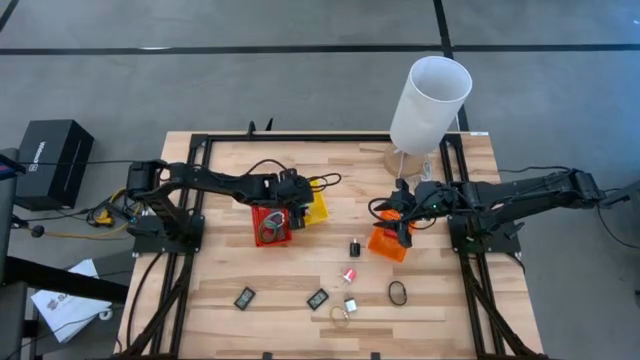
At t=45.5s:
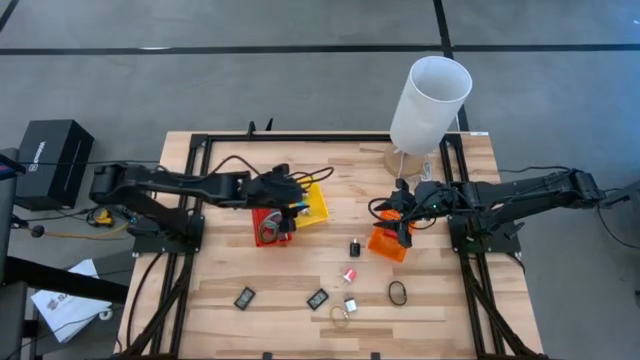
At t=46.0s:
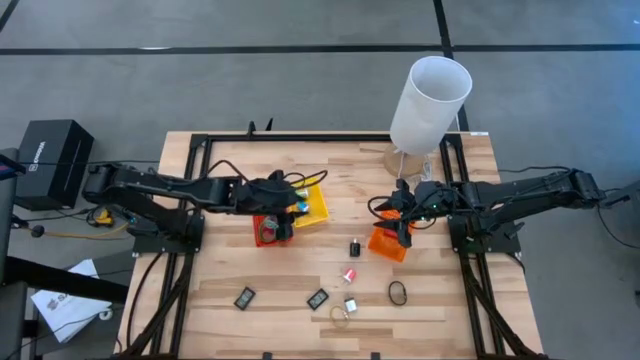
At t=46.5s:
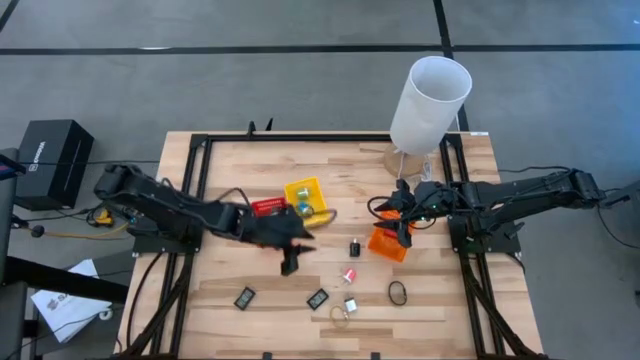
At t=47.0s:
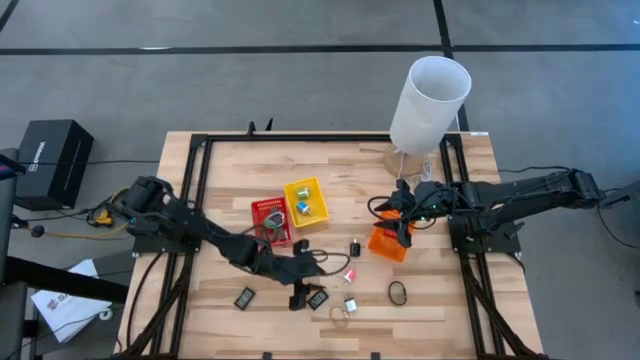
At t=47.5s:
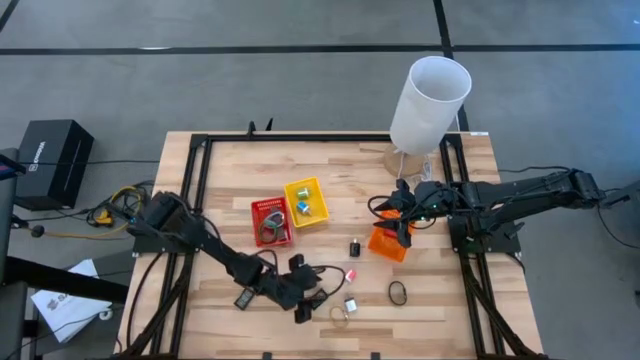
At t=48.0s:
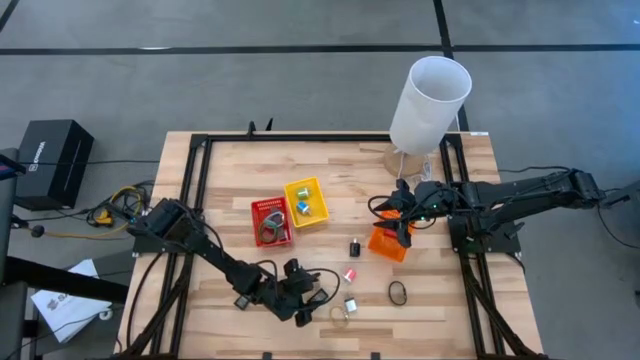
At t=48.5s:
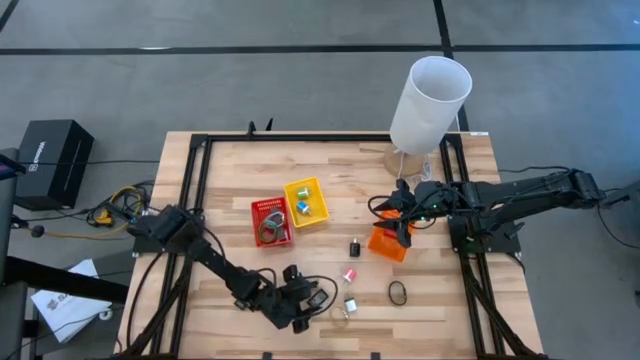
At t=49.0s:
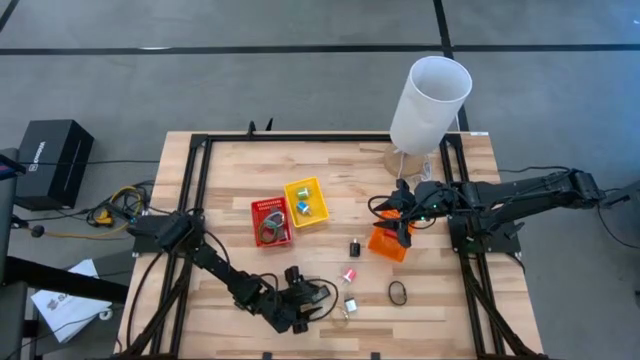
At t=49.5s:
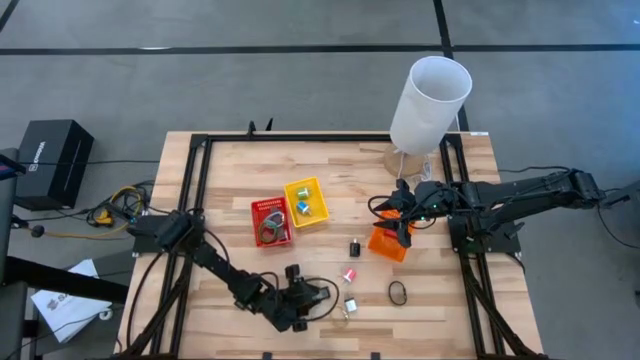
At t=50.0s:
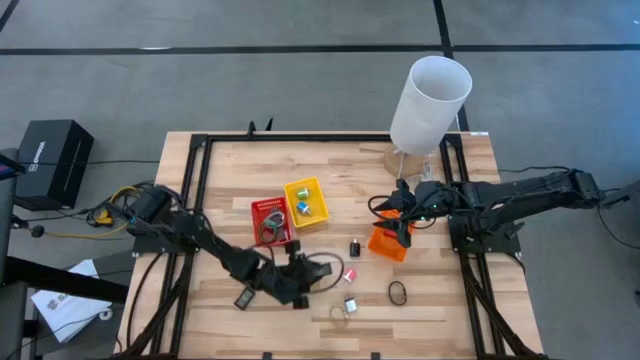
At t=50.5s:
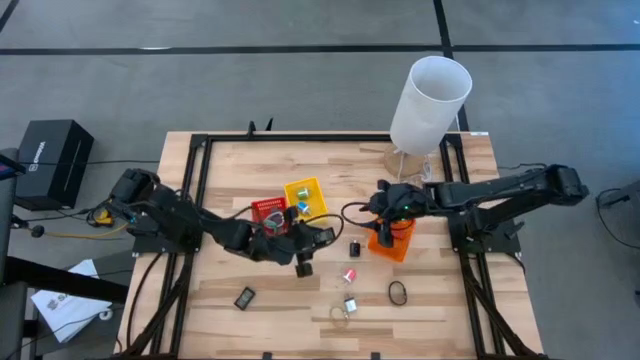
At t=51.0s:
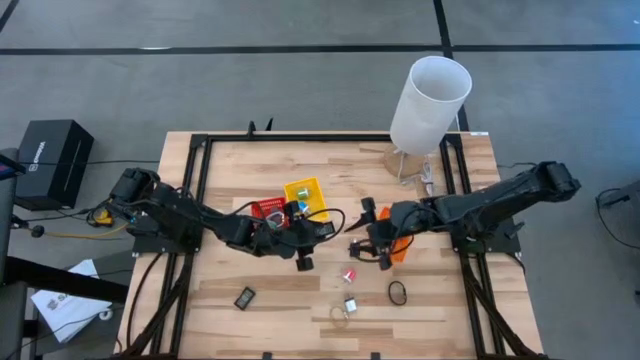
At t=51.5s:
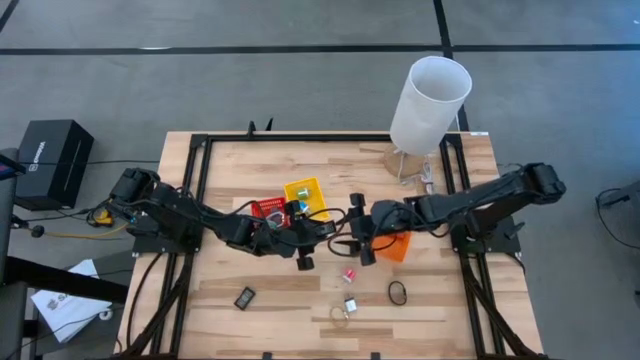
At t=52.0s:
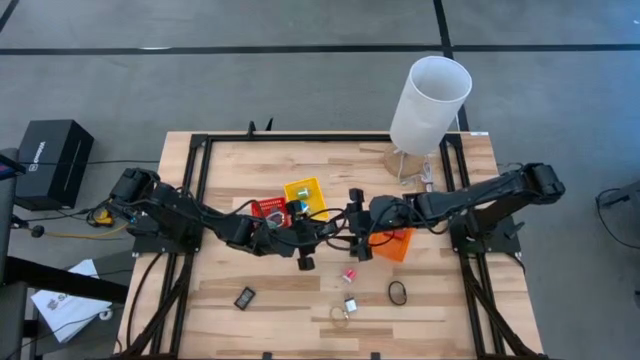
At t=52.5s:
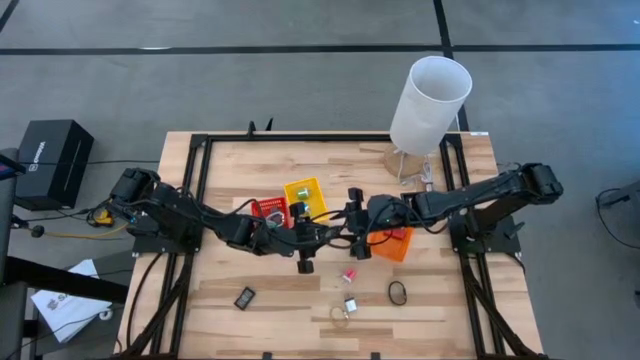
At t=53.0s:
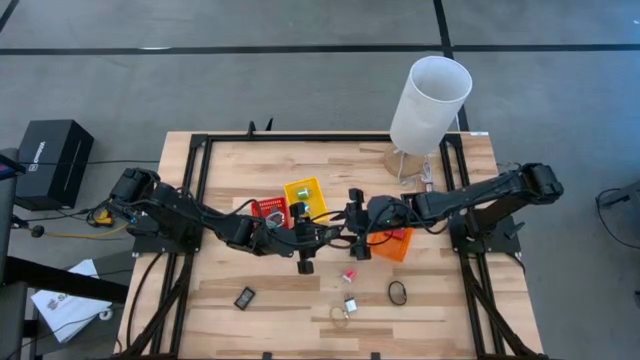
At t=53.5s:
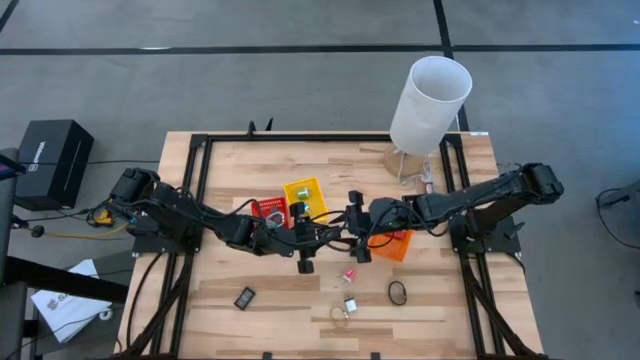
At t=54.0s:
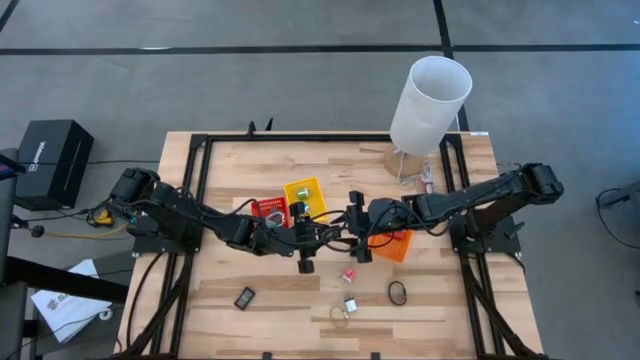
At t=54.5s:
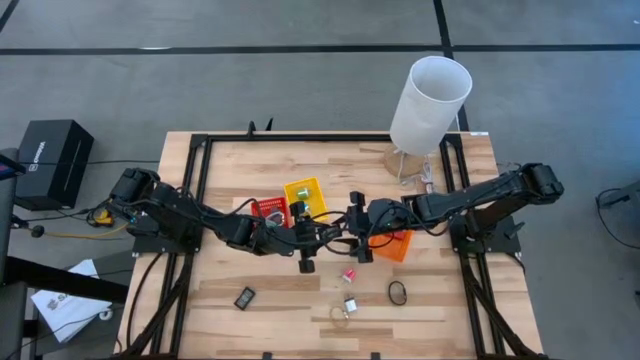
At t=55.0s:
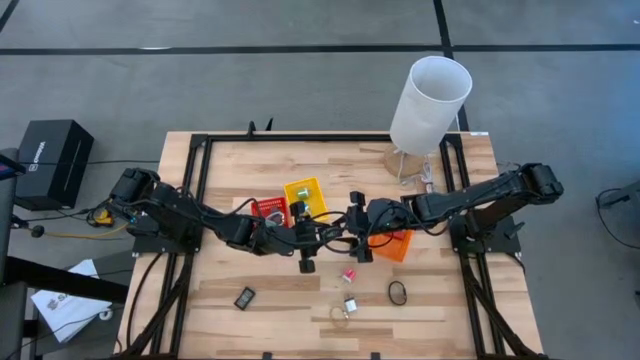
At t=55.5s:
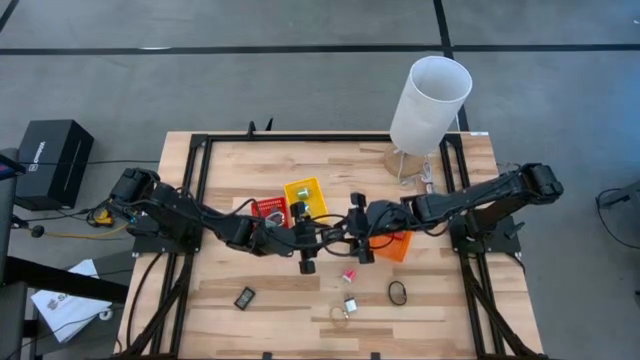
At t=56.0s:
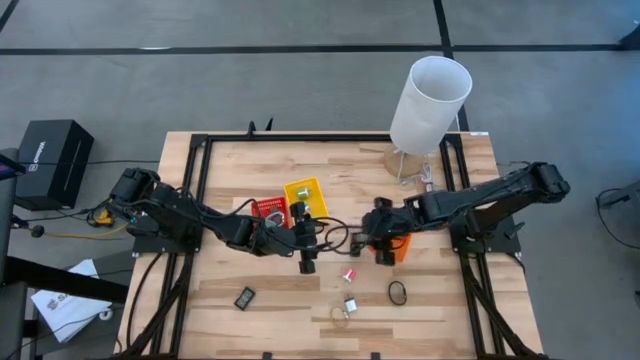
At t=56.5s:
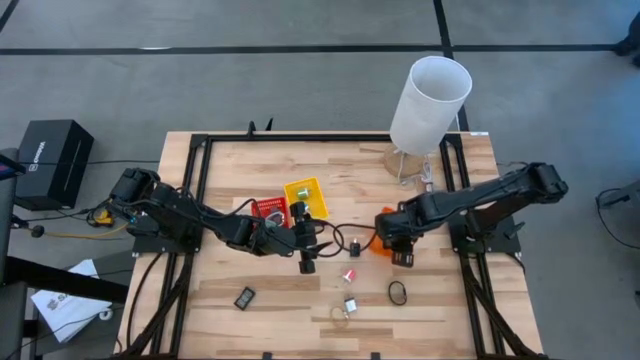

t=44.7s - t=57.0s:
Task: Pick & Place Office items
Put the right black digital clock into the orange bin

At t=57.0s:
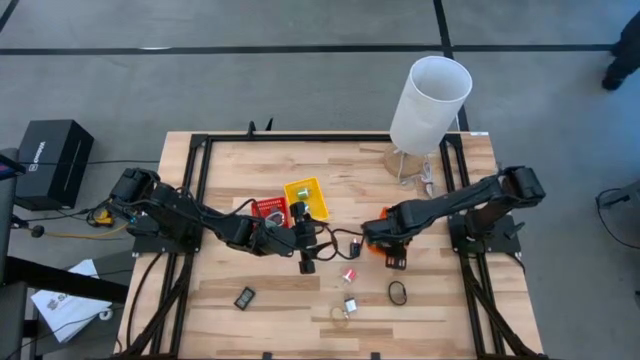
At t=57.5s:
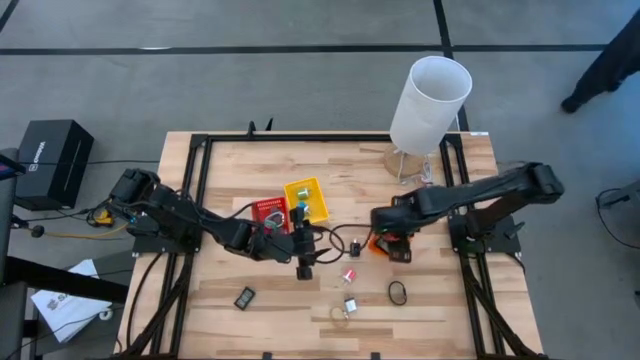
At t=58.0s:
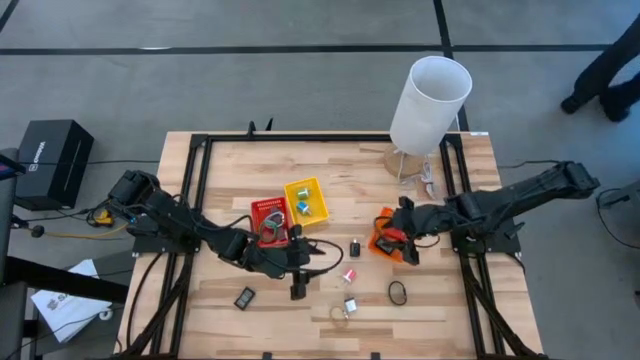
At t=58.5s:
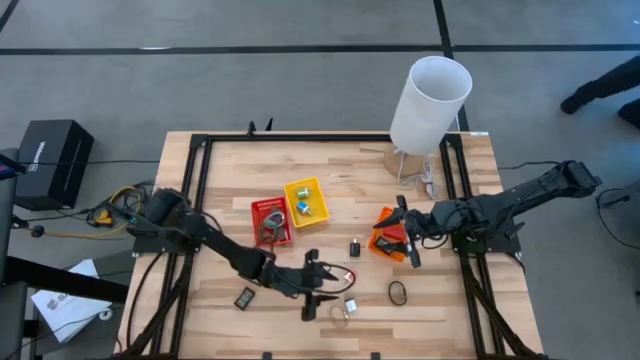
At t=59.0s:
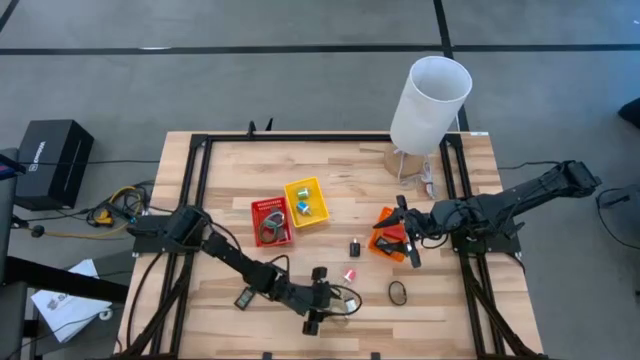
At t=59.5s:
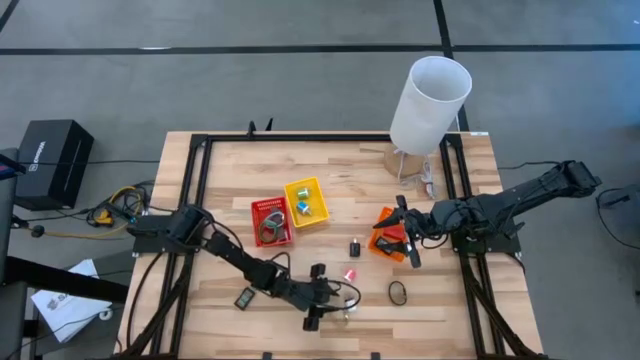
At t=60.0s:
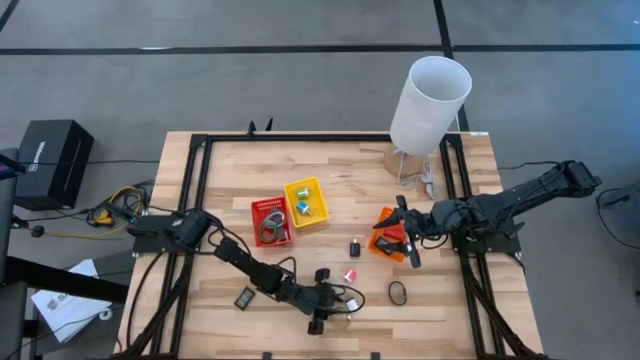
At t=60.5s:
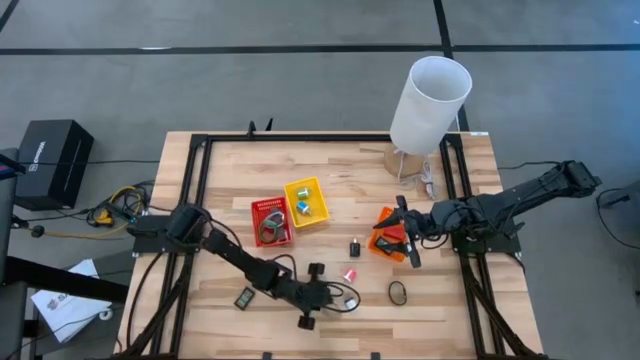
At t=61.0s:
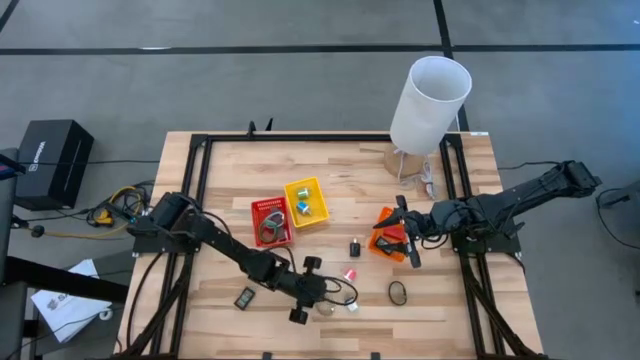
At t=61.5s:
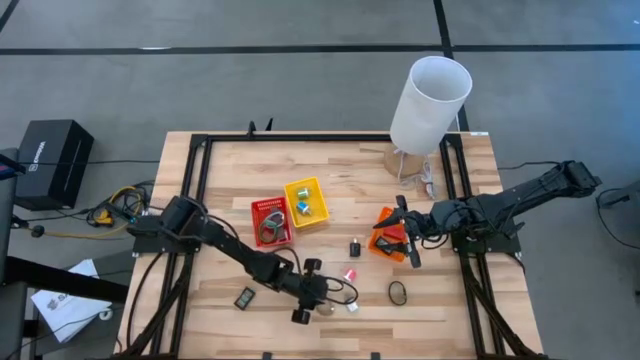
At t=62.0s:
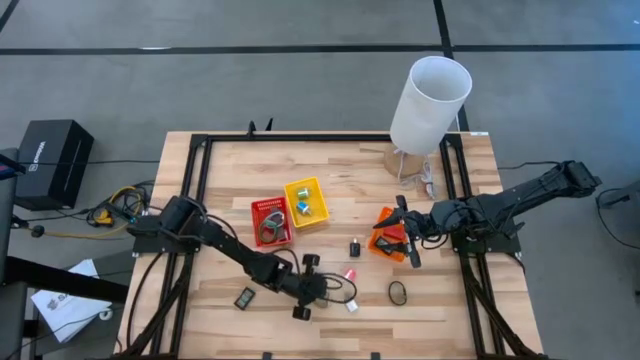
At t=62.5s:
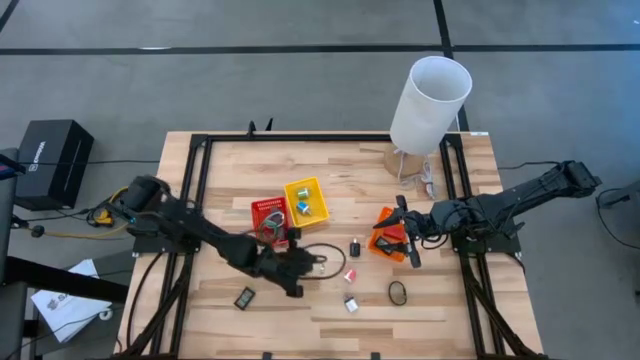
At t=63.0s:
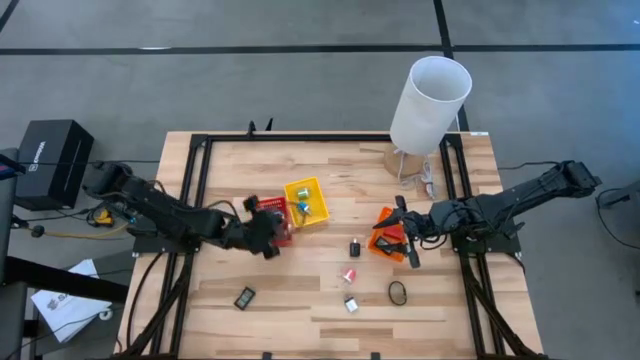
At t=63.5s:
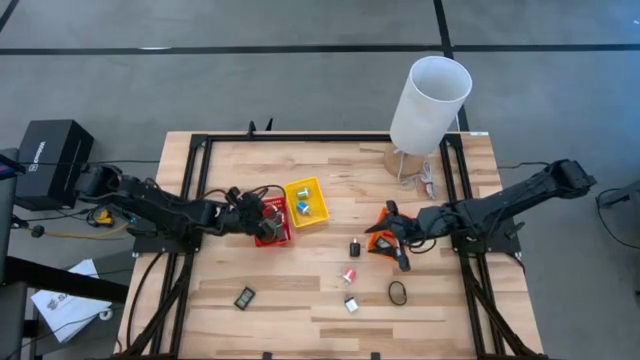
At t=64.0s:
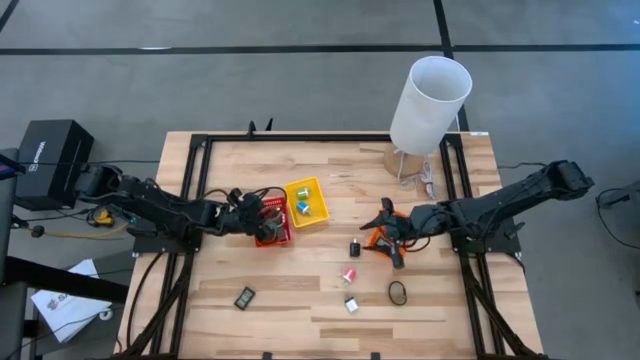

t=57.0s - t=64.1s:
Put the gold wrist watch into the red bin

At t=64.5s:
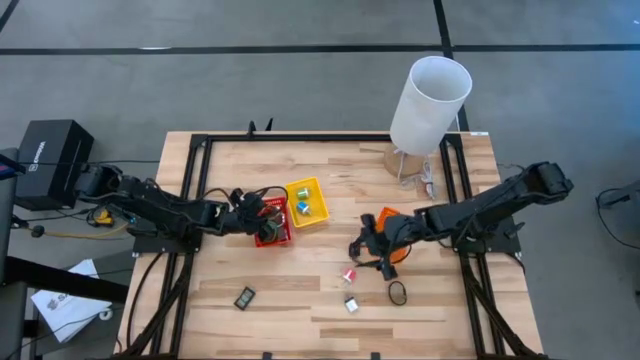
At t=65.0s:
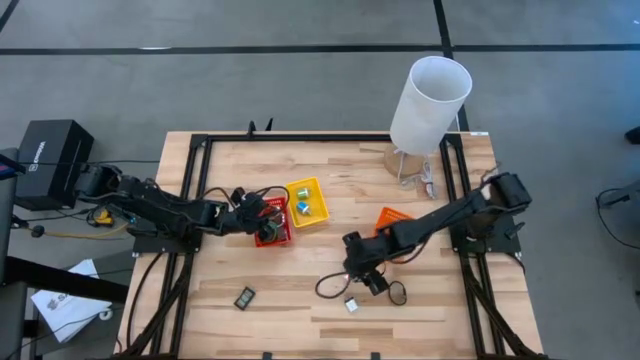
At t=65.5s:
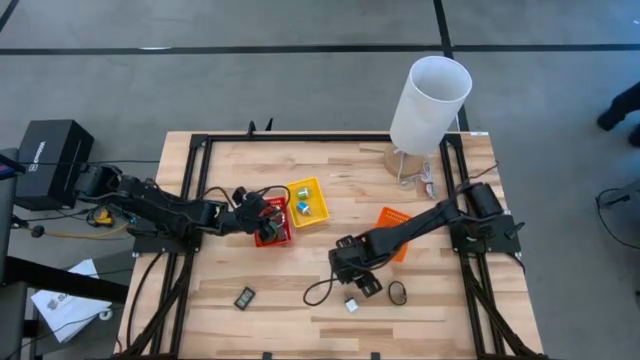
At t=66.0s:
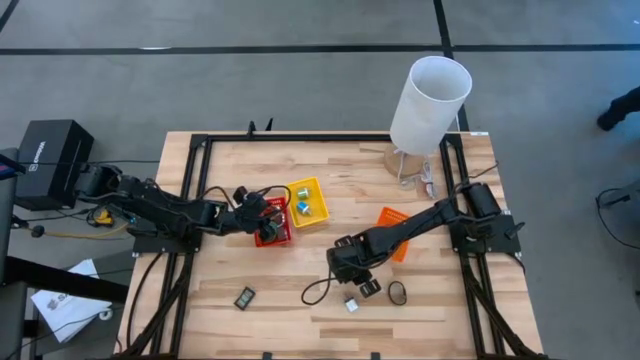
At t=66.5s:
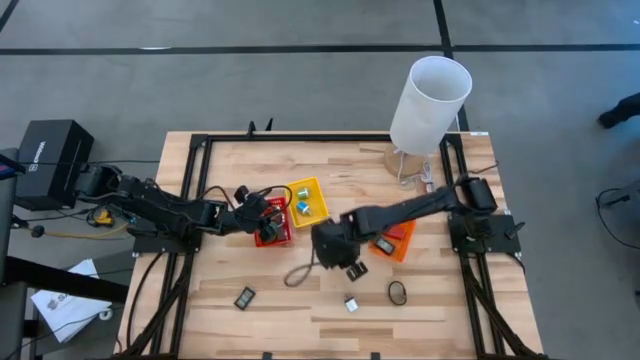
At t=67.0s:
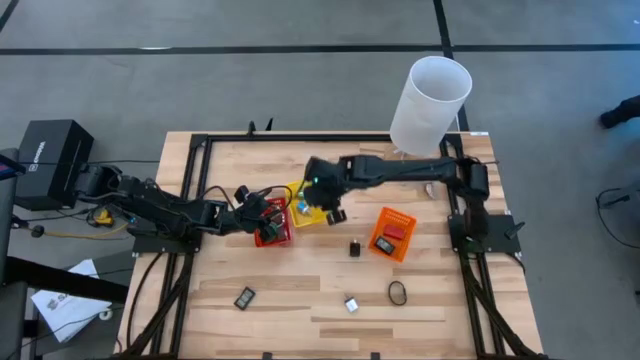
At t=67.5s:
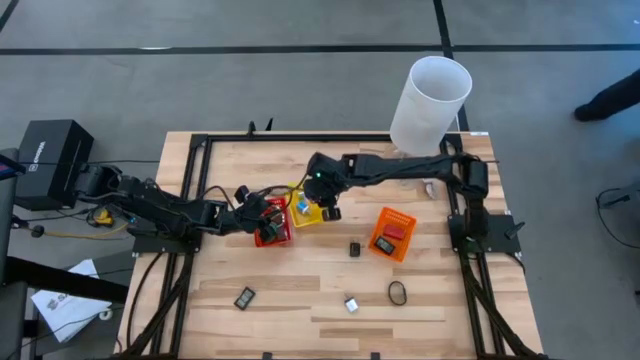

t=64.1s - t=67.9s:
Put the pink charger adapter into the yellow bin
